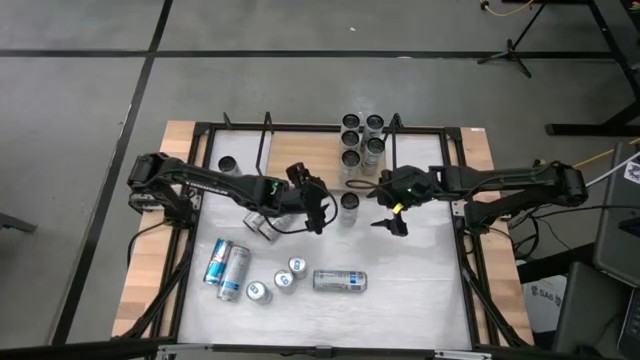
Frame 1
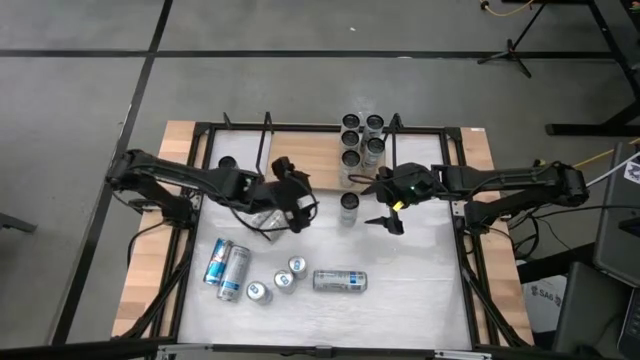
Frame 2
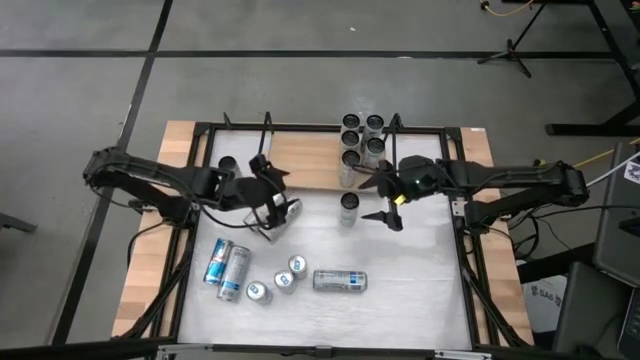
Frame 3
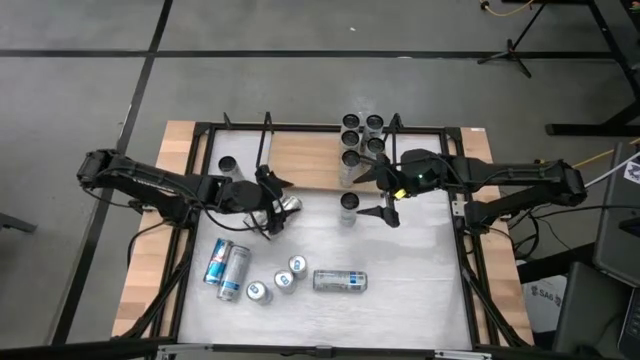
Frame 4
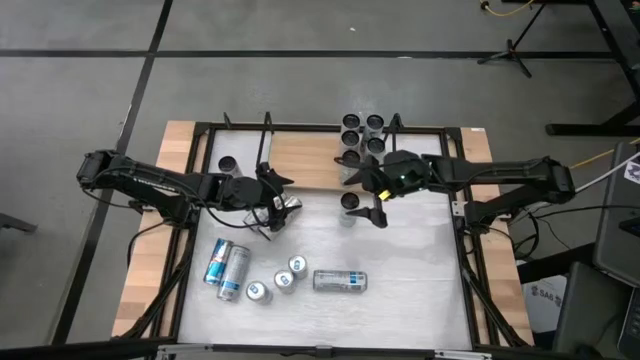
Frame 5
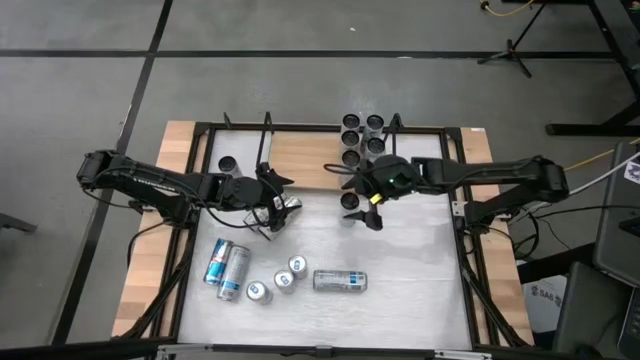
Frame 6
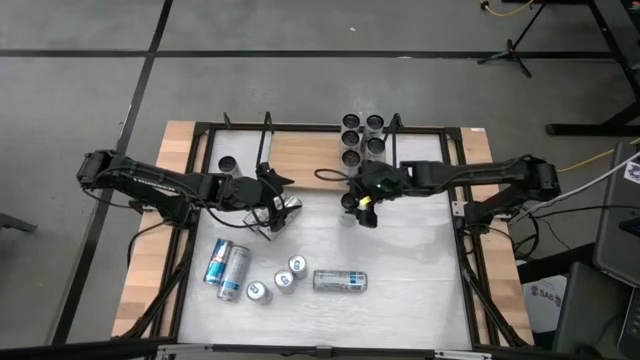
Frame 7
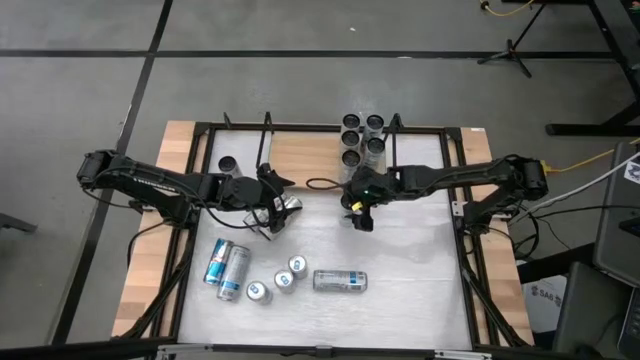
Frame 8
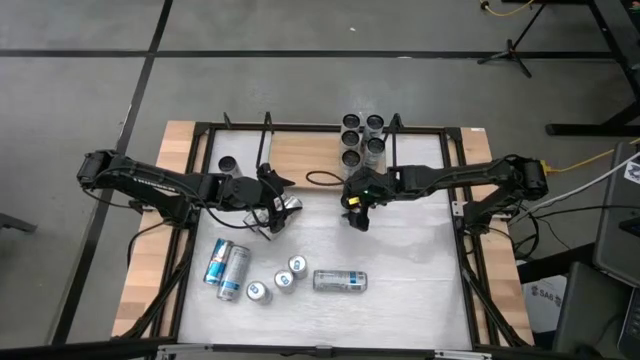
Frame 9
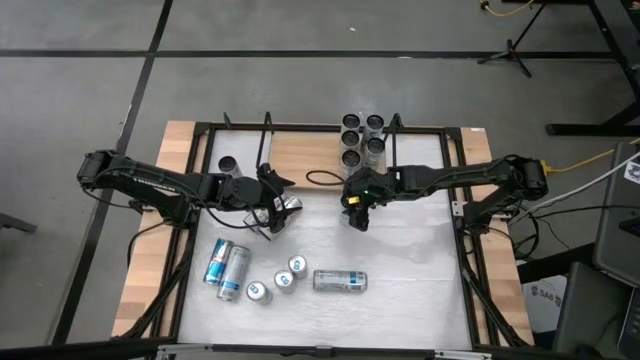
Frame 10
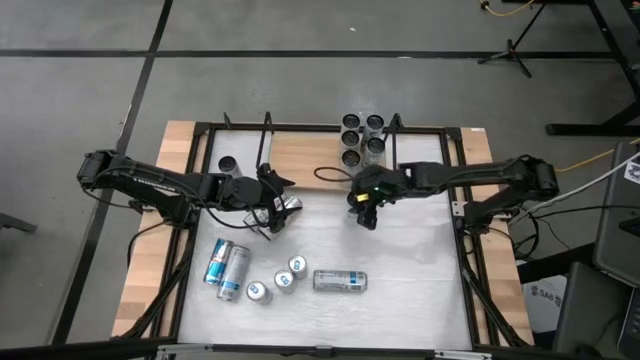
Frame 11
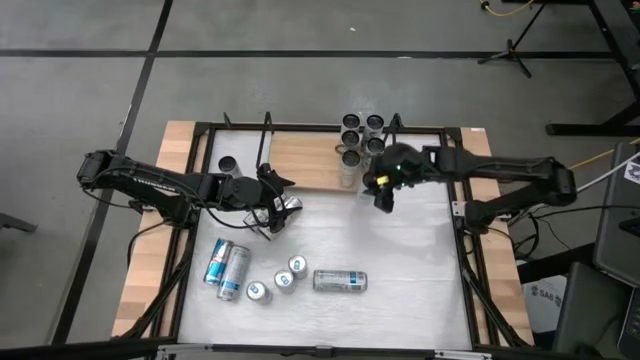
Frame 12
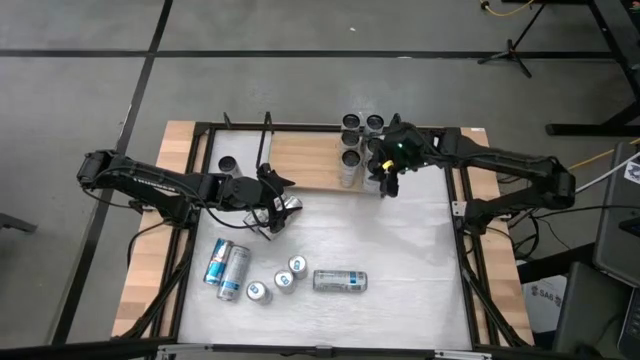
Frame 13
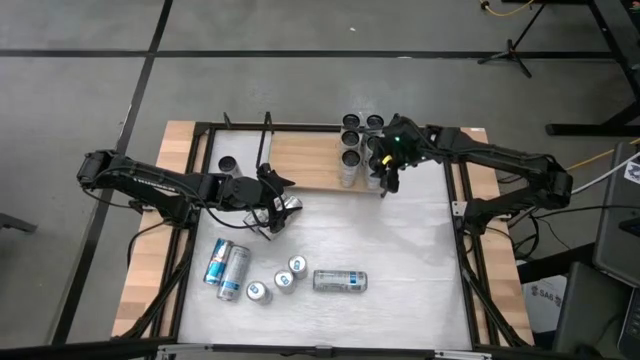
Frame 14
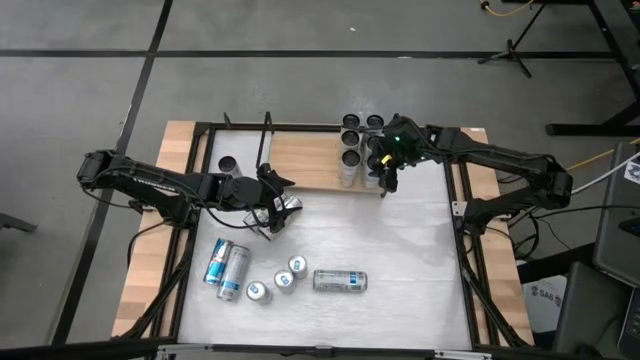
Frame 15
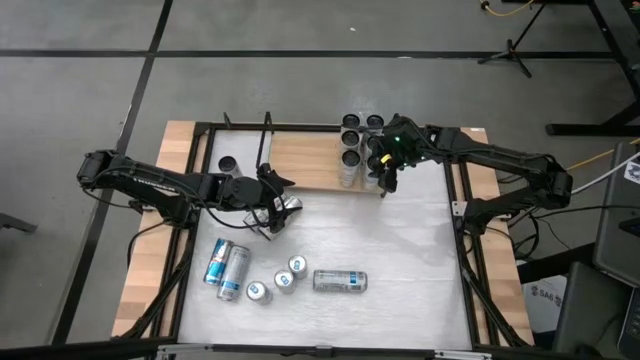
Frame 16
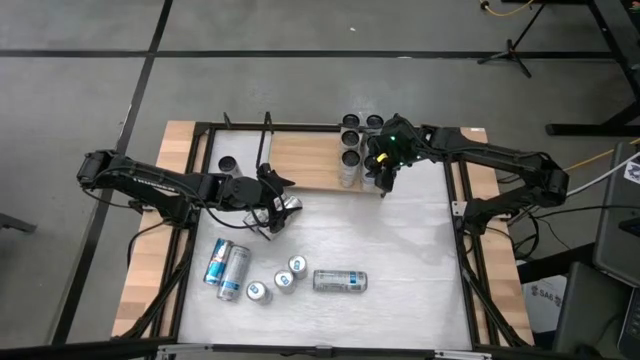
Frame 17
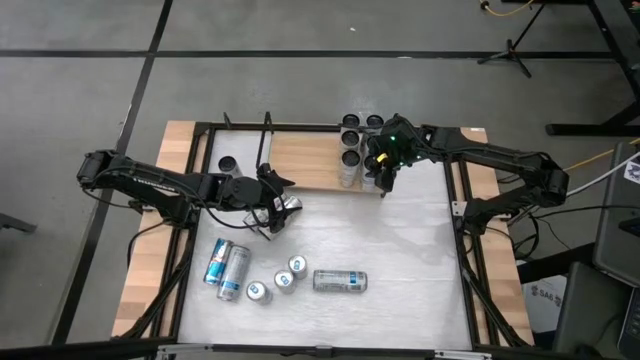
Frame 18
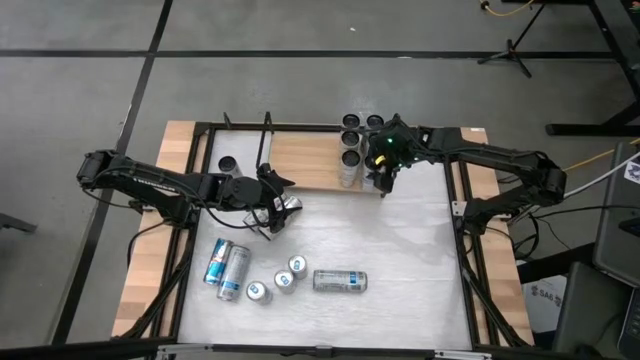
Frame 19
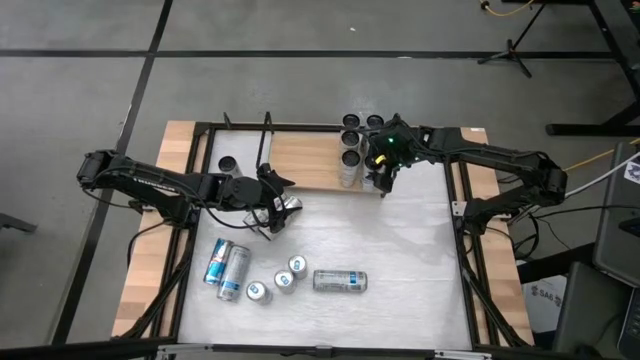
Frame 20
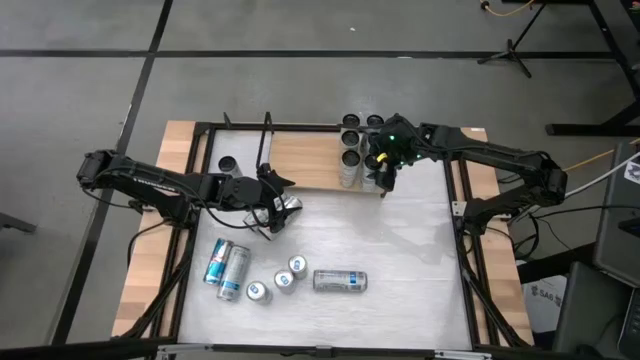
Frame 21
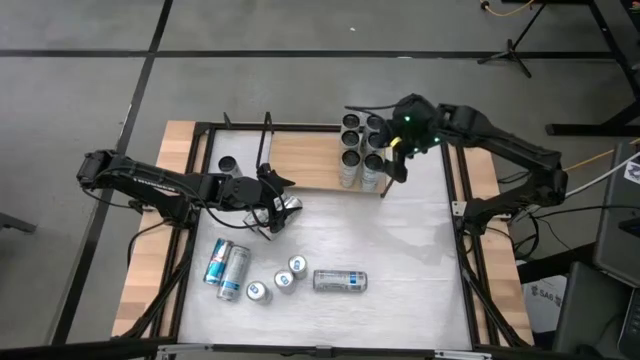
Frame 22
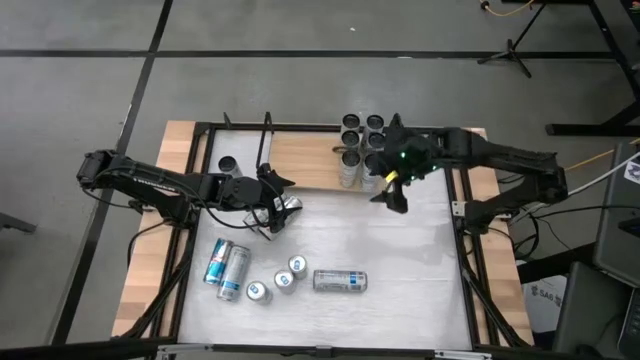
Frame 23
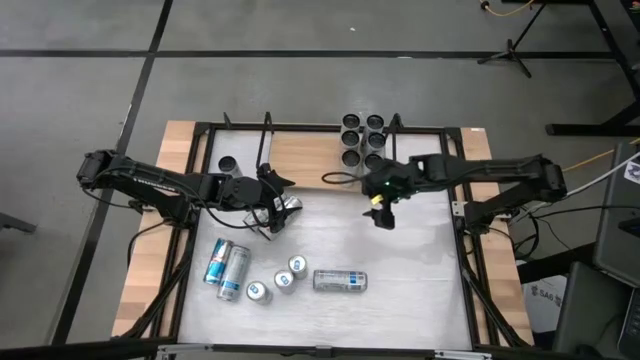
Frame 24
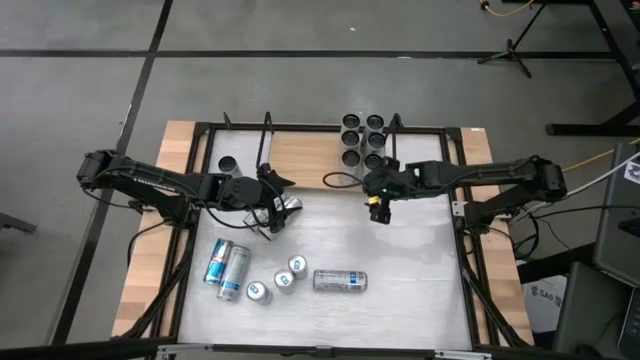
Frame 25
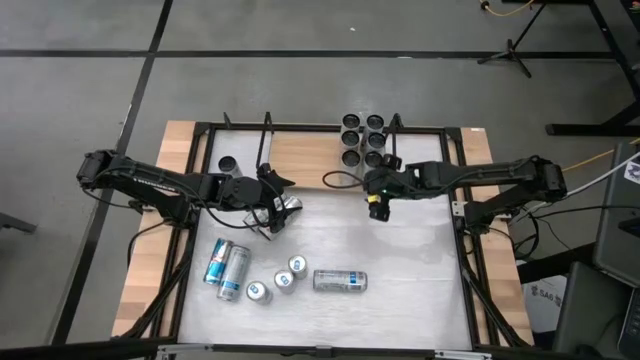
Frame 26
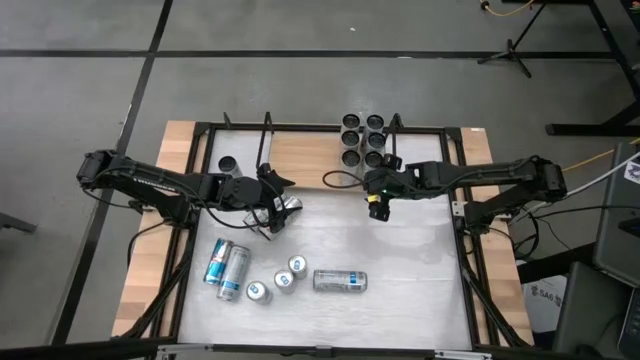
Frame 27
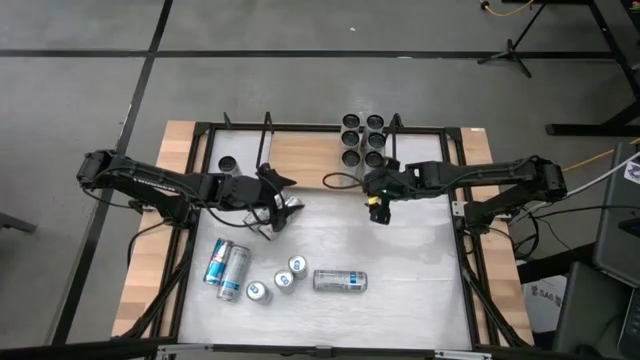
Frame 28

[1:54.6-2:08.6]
Task: Place canned beverage on shelf
Put the white soda can aligned with the other white soda can on the shelf

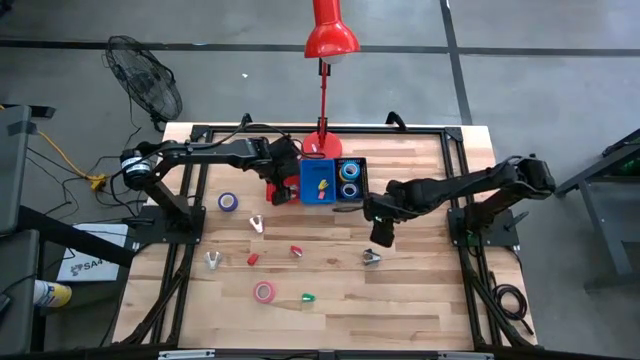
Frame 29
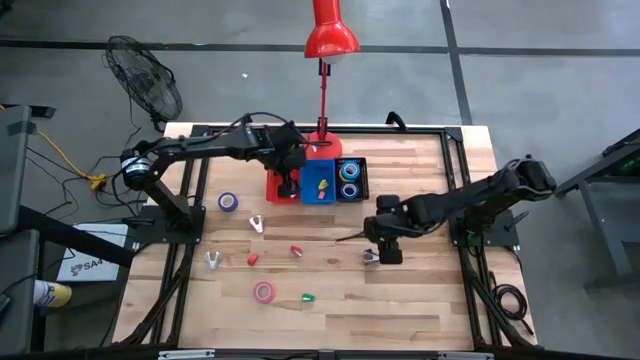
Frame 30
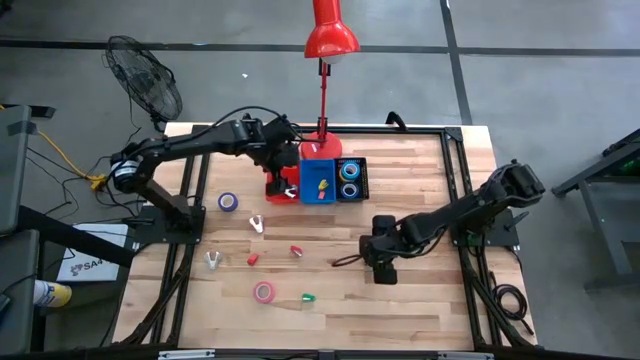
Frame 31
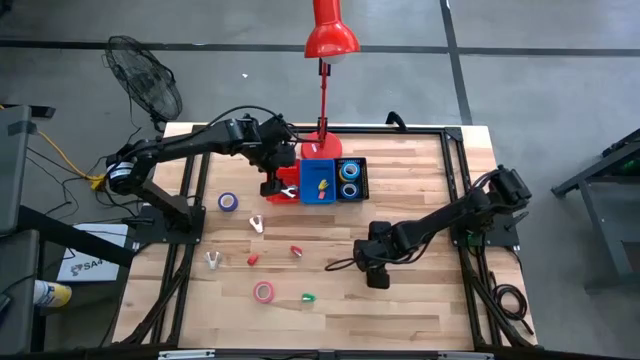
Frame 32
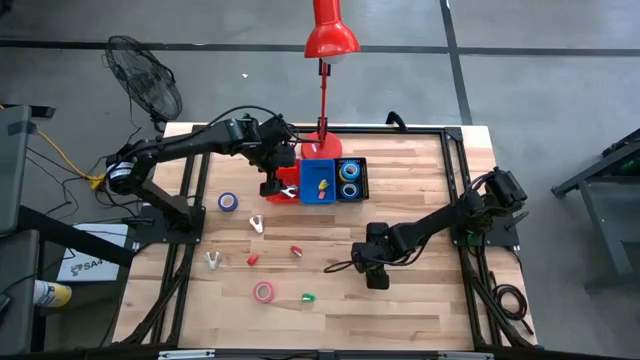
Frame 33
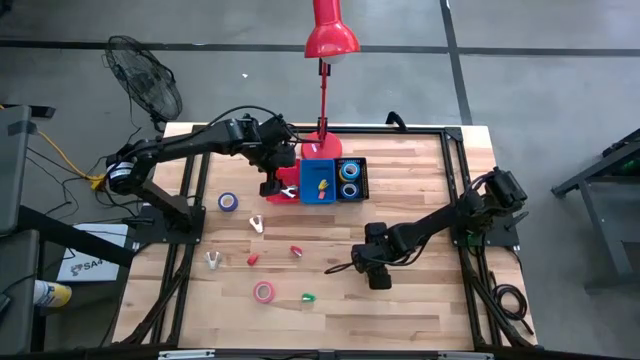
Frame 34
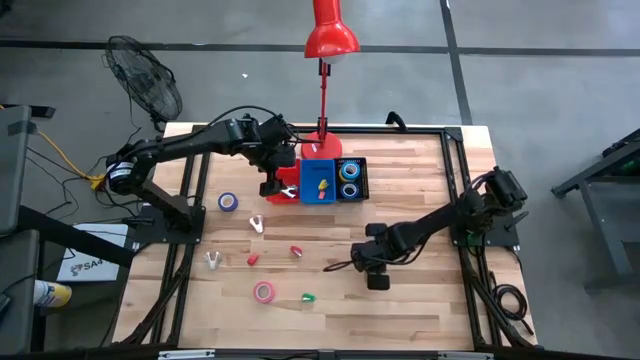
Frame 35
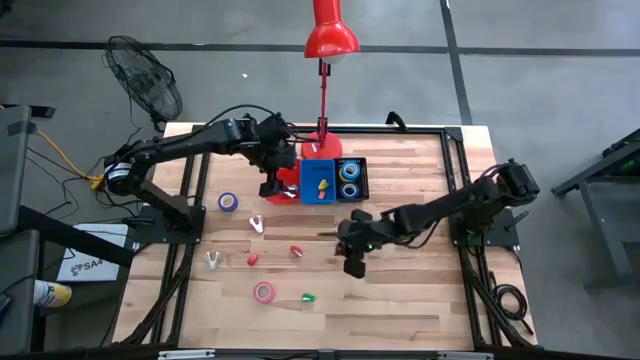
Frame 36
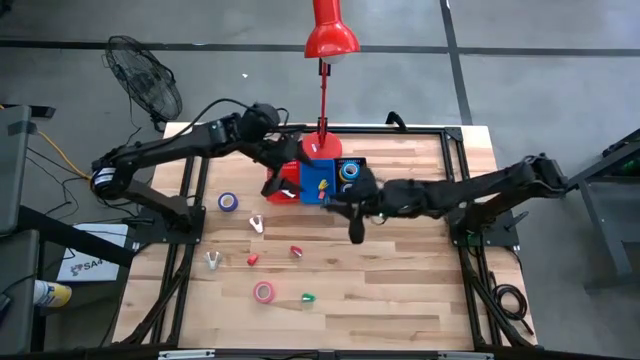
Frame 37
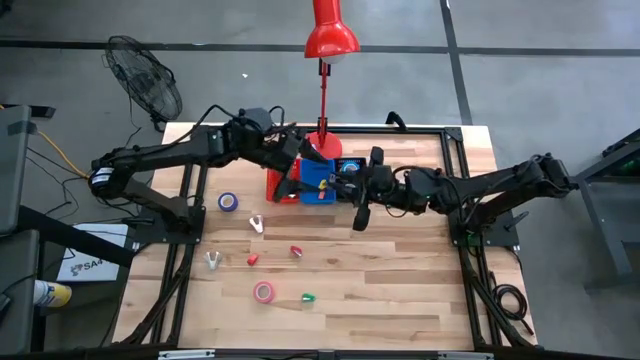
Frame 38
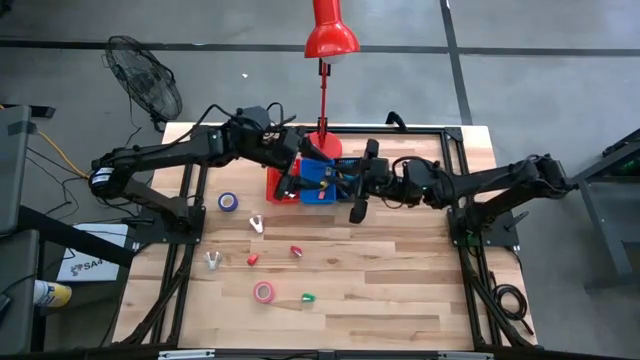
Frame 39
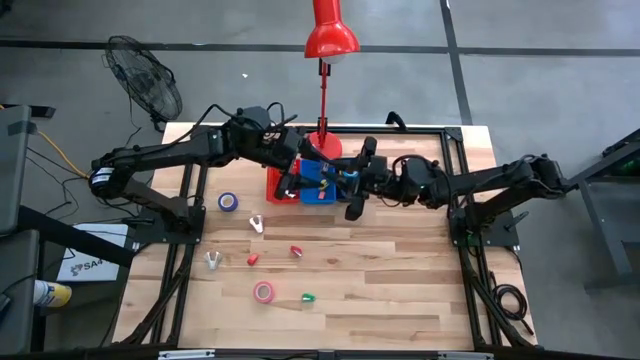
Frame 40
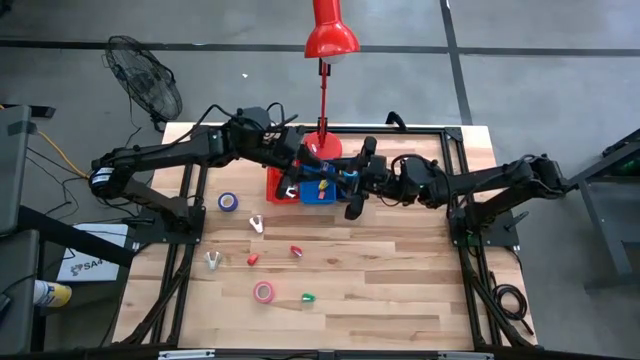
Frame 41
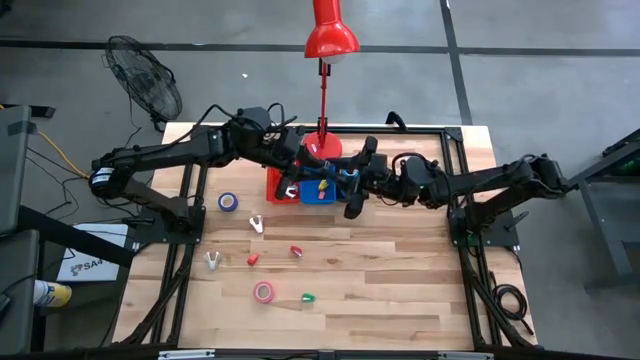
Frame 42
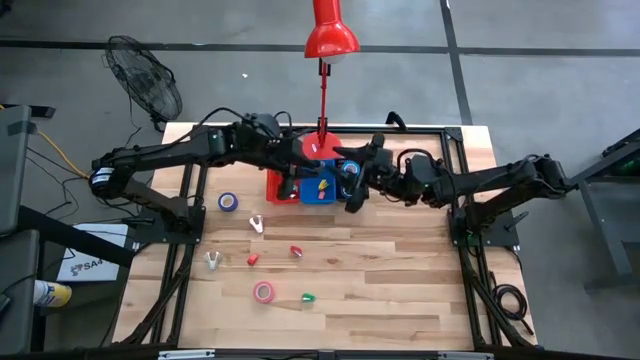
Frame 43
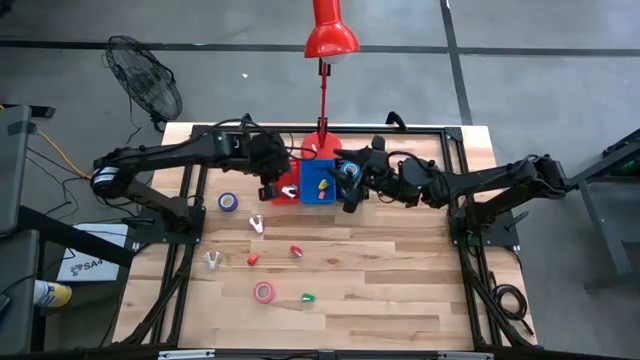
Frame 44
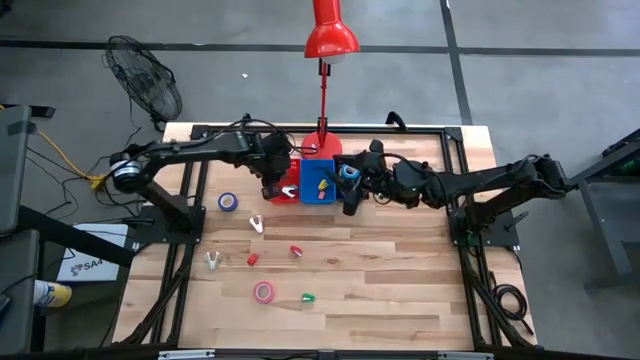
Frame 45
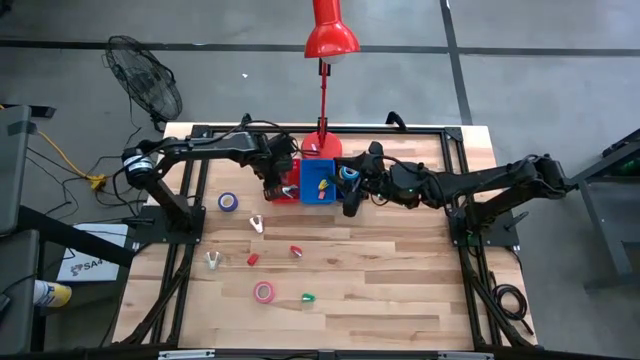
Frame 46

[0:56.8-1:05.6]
Task: Pick and place Stapler, Stapler remover, tape
Put the black staple remover into the red basket
